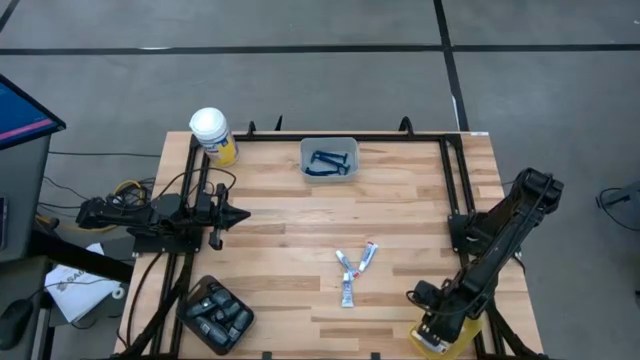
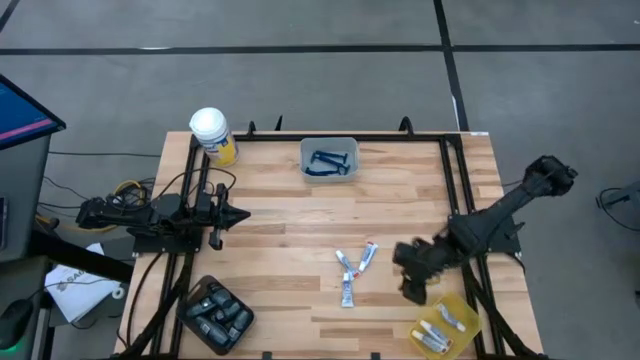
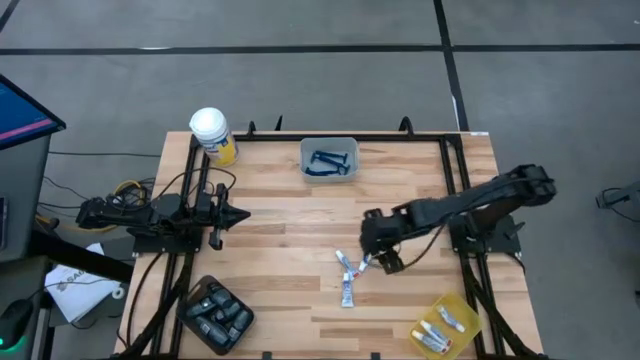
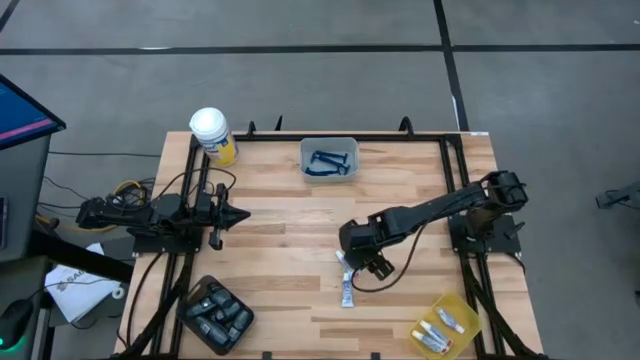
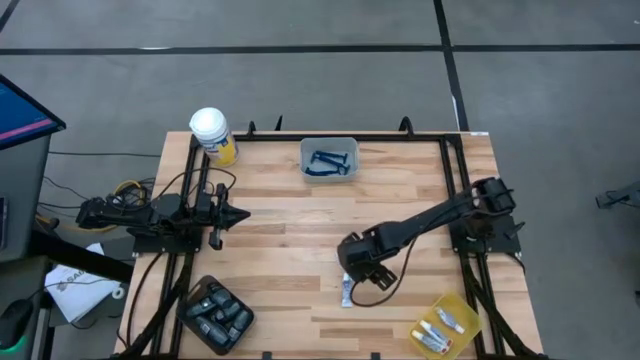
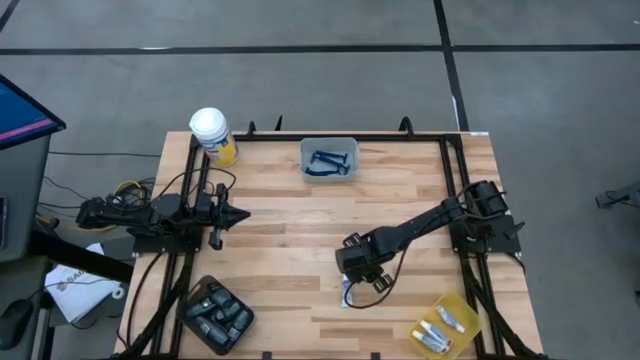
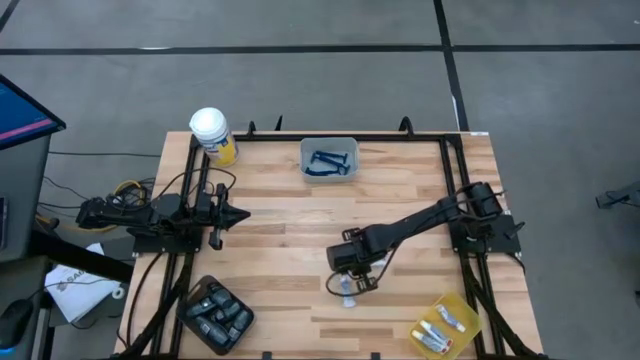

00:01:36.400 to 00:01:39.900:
Task: Pick & Place Travel size toiletries
Put the white toothpaste into the yellow bin

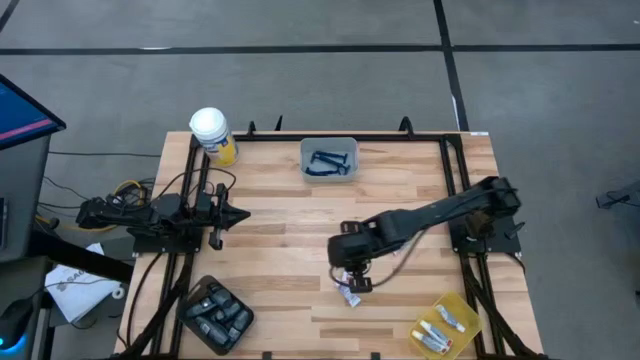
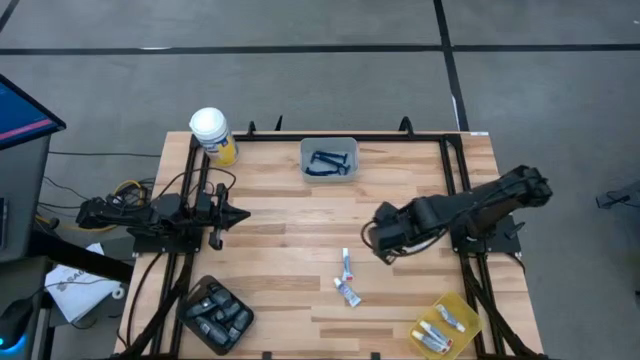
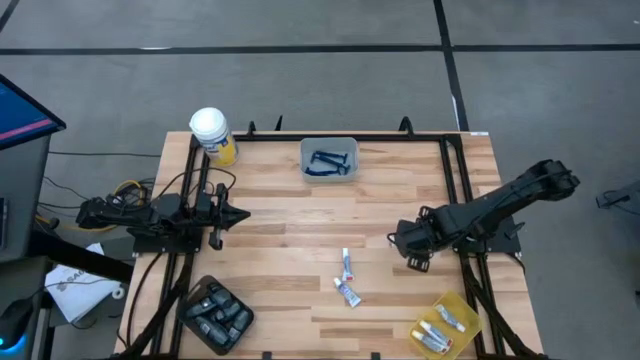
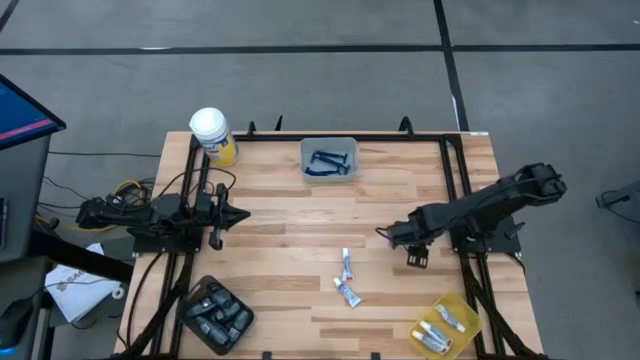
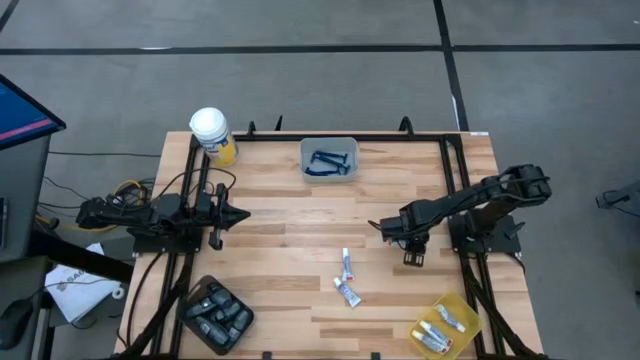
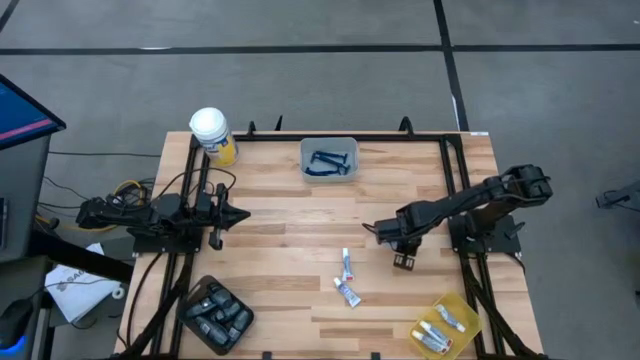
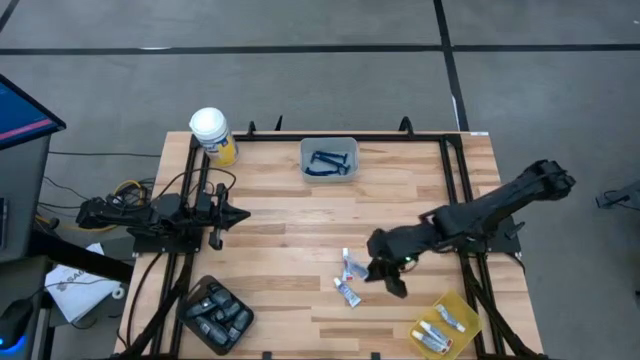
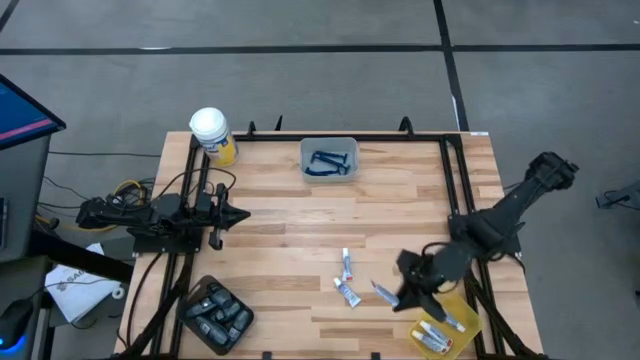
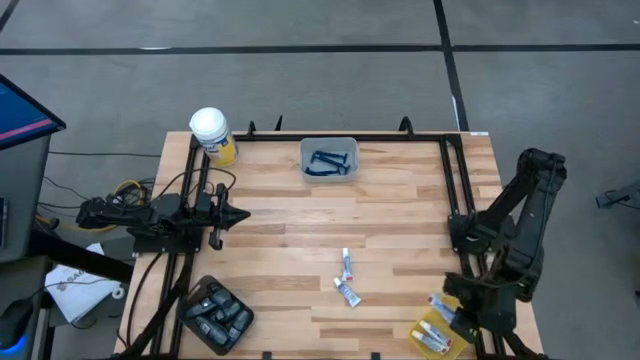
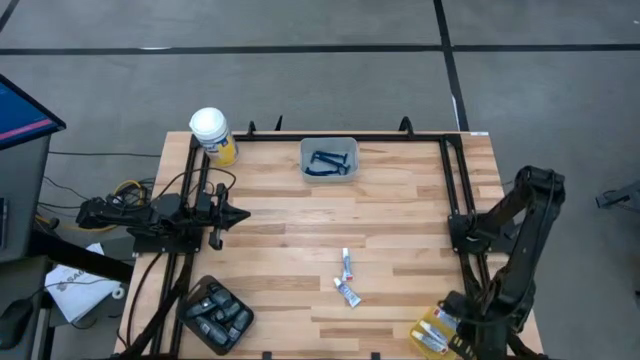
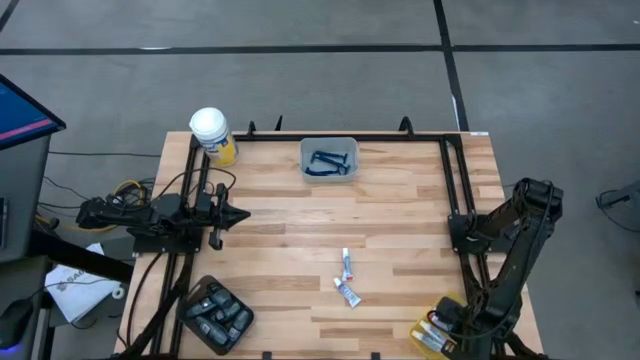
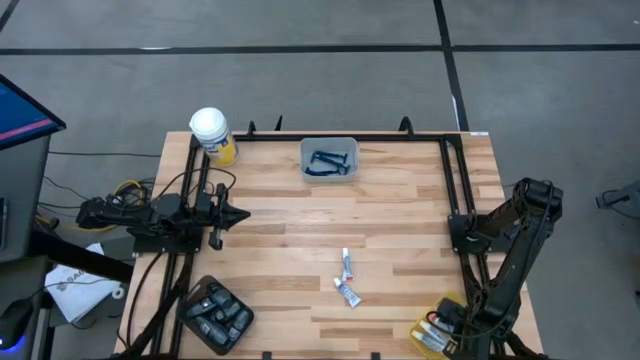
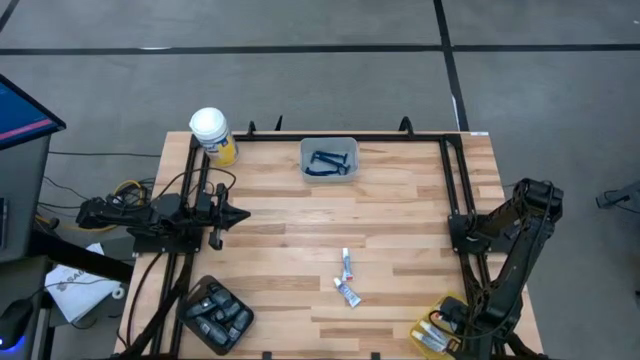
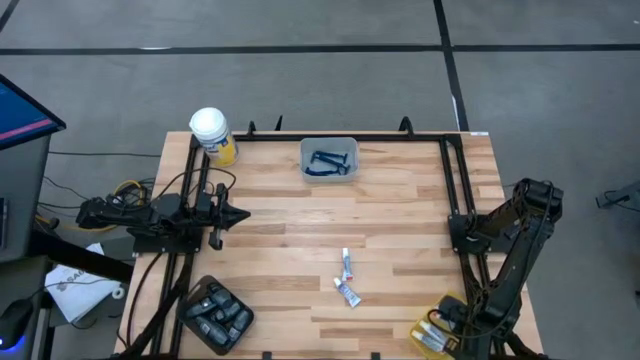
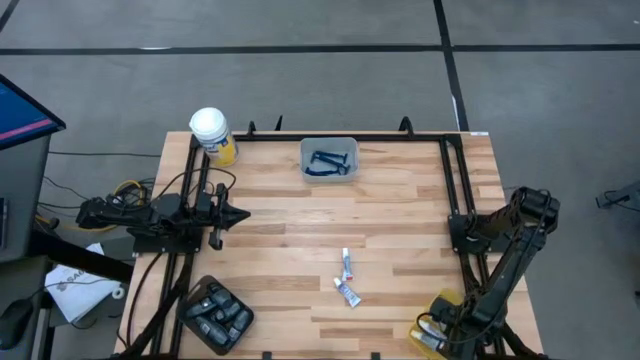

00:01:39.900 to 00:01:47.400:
Put the white toothpaste into the yellow bin

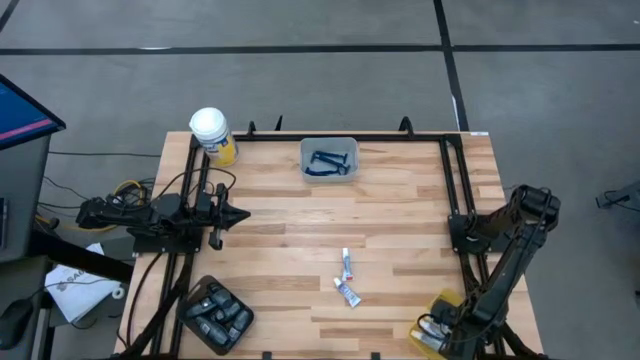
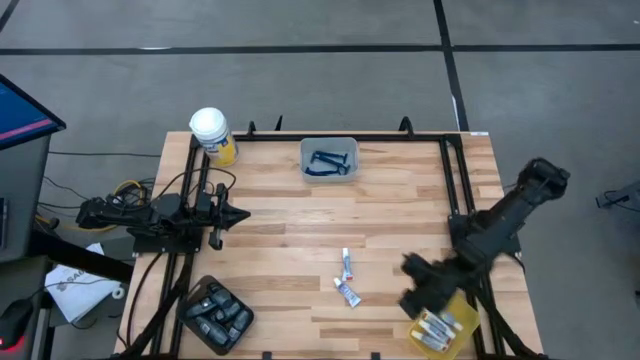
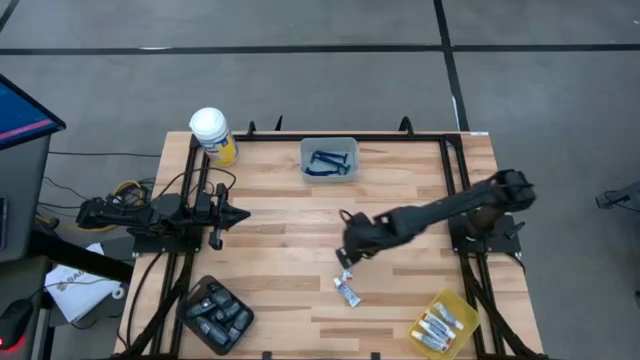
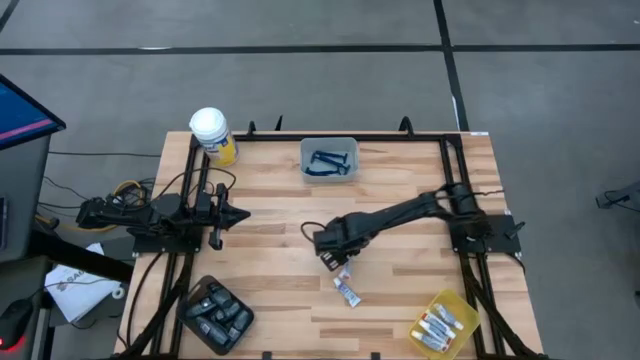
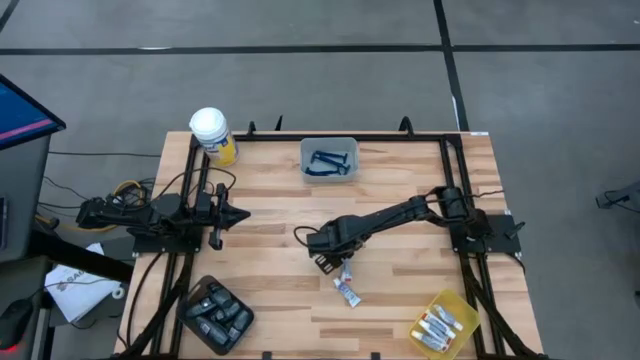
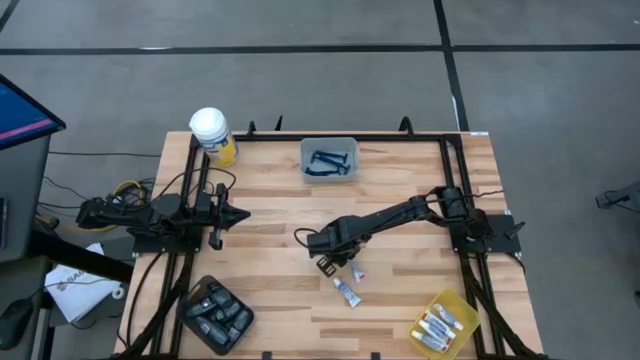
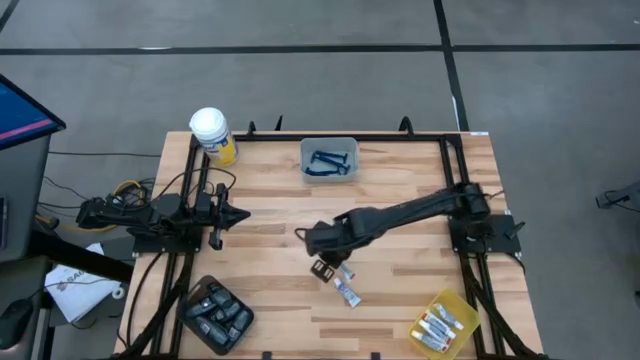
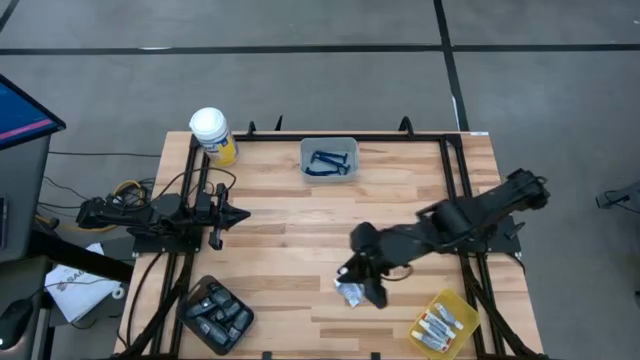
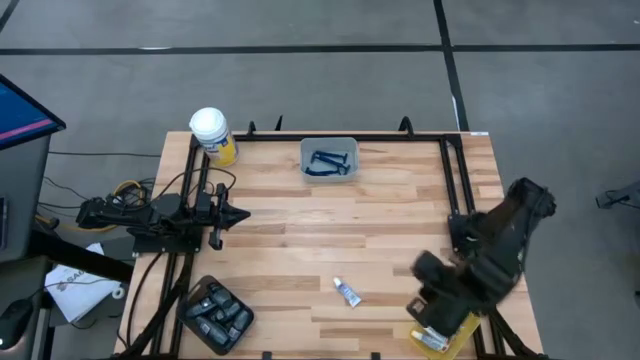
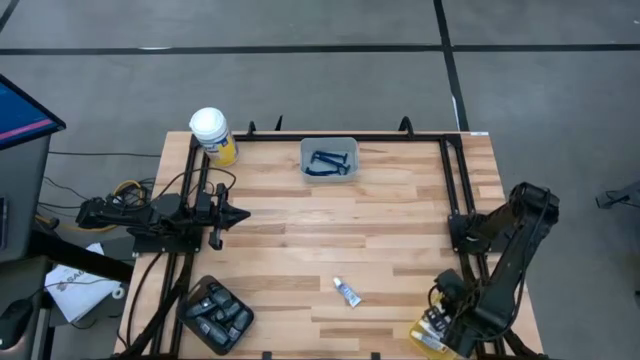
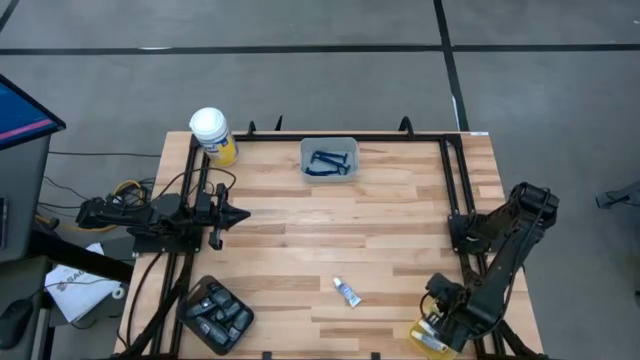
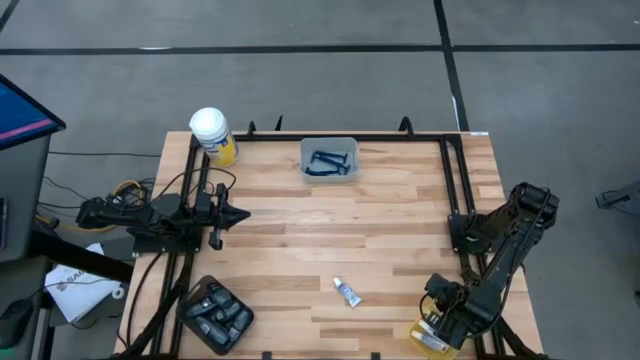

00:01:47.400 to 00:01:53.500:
Put the white toothpaste into the yellow bin

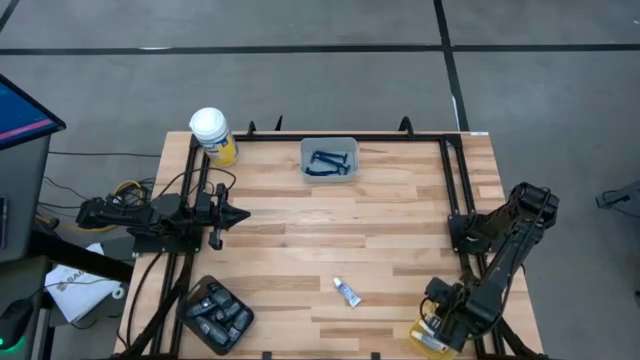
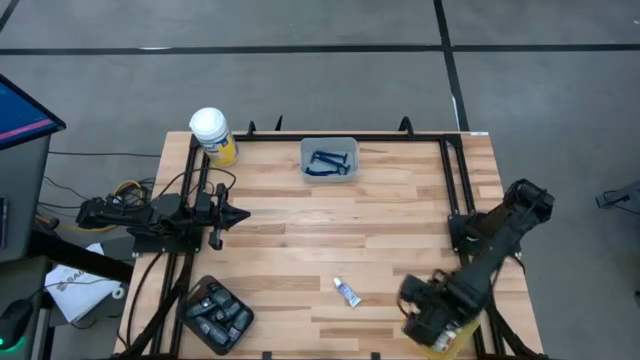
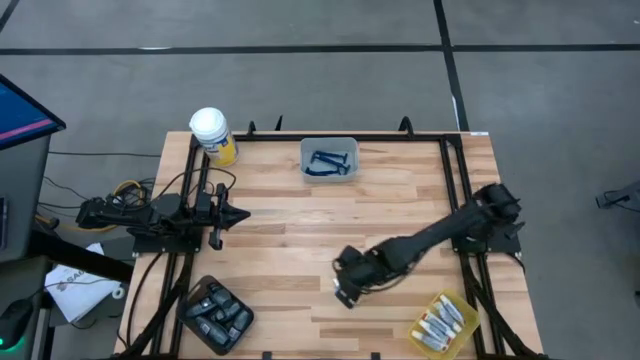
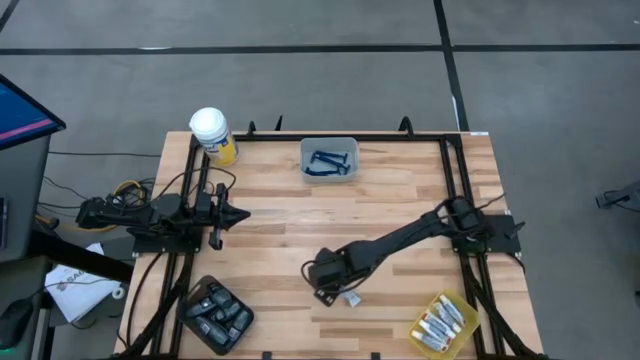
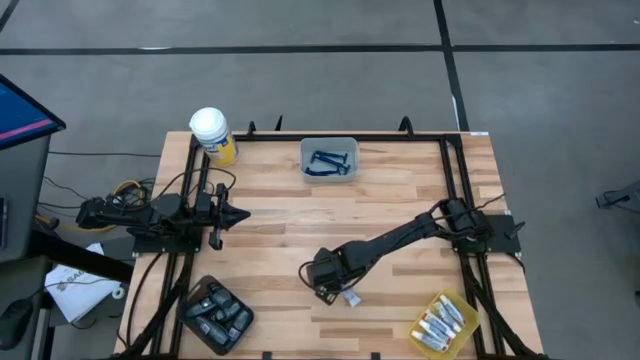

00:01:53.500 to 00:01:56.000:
Put the white toothpaste into the yellow bin

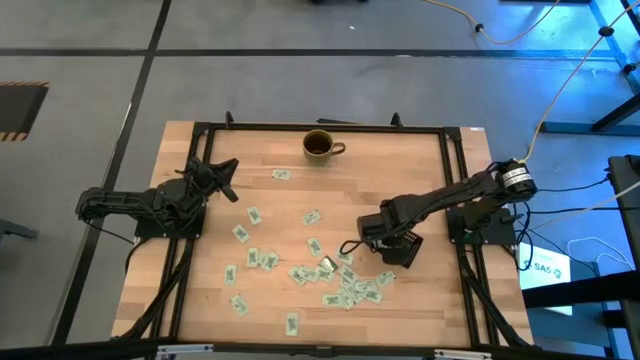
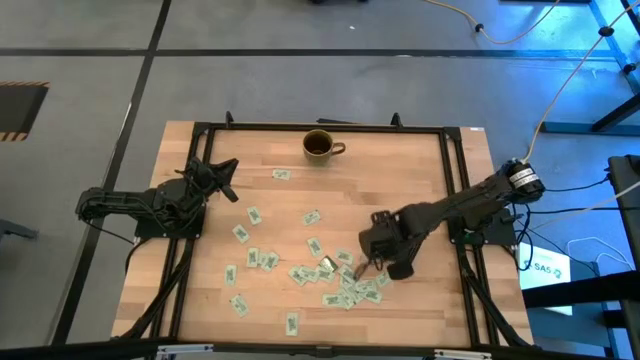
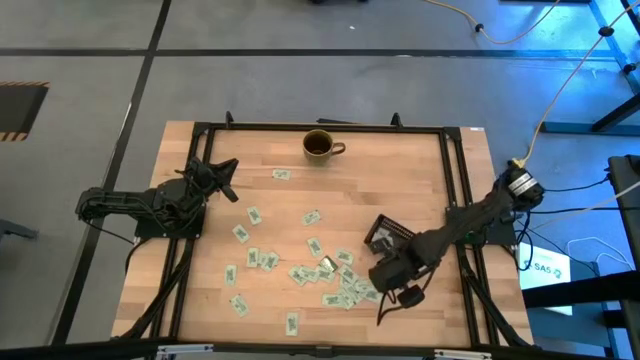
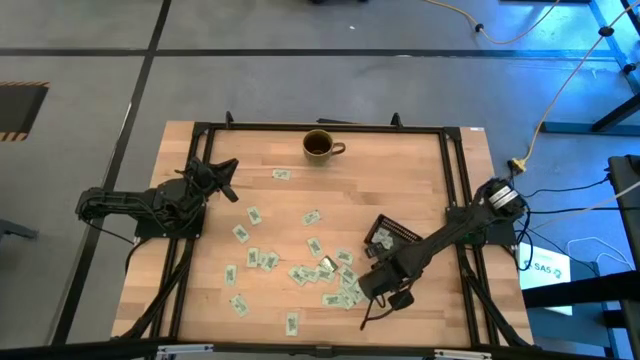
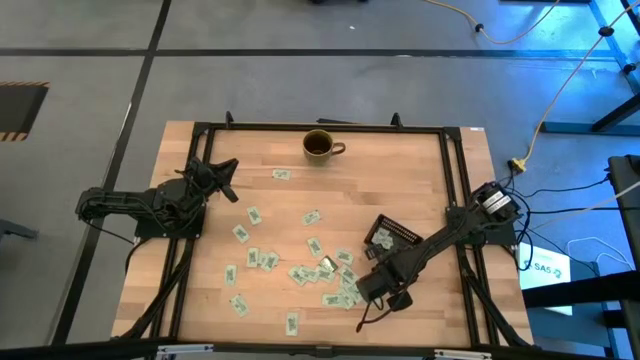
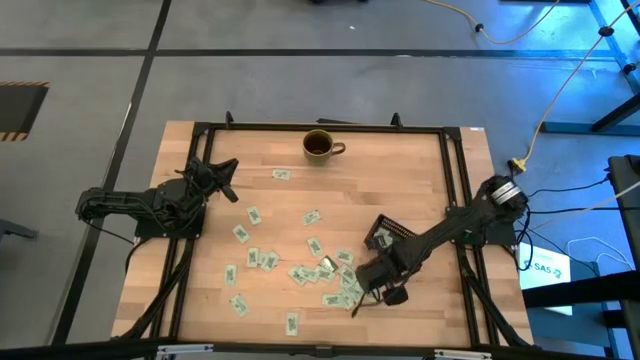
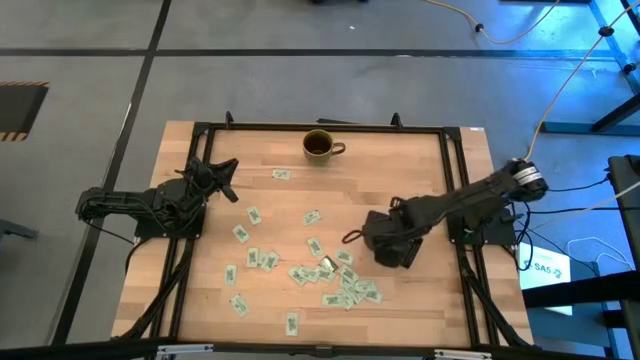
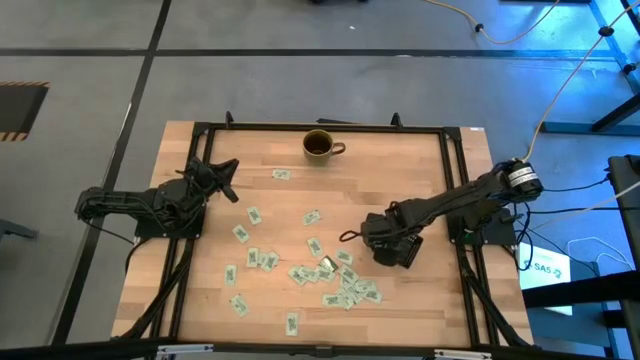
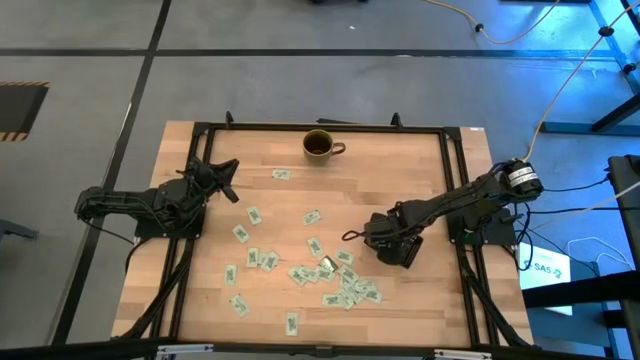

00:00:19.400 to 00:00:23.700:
Task: Pick and place Stevia / Truvia into bins
Put the stevia packet into the black bin
